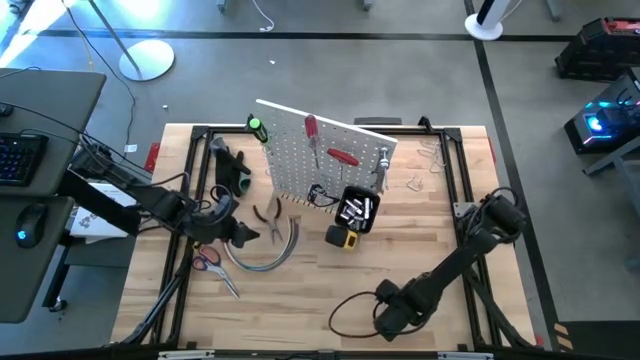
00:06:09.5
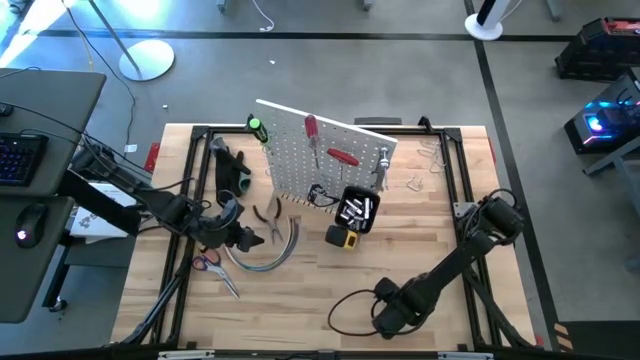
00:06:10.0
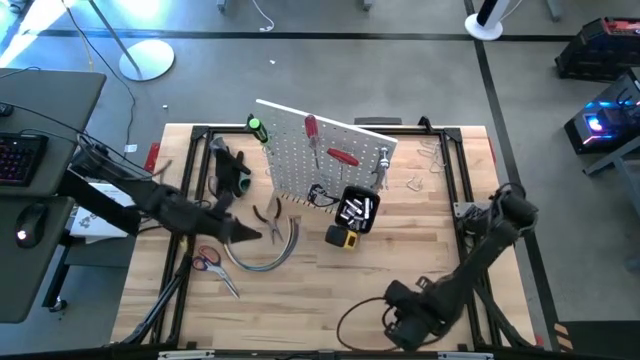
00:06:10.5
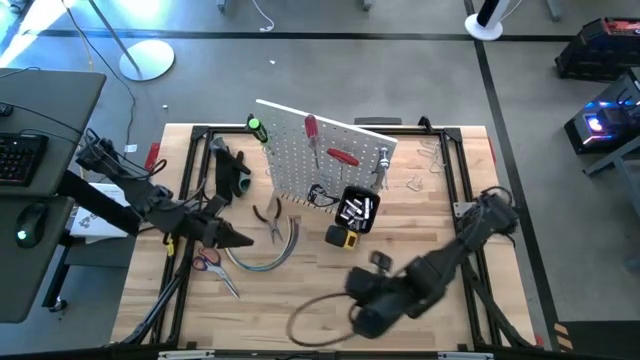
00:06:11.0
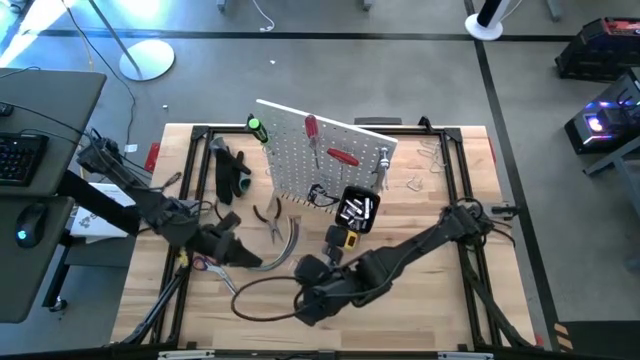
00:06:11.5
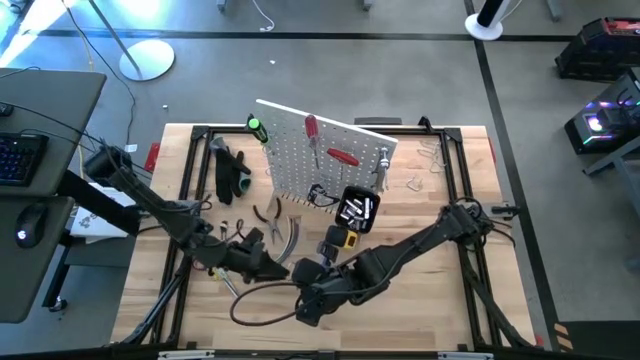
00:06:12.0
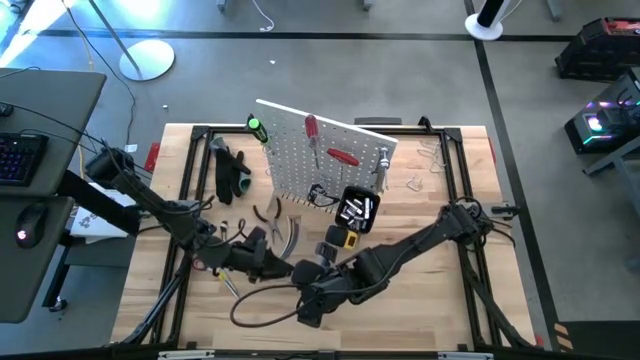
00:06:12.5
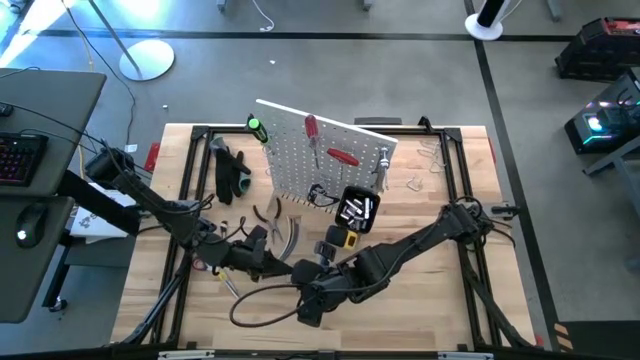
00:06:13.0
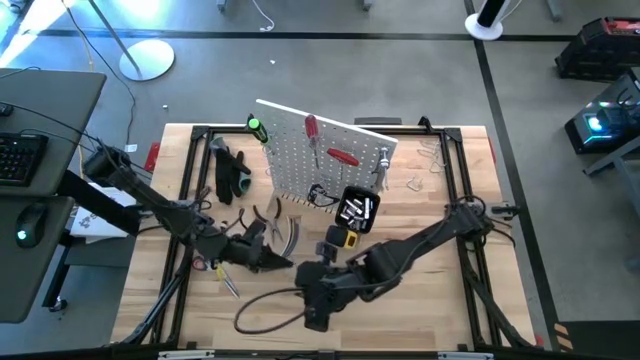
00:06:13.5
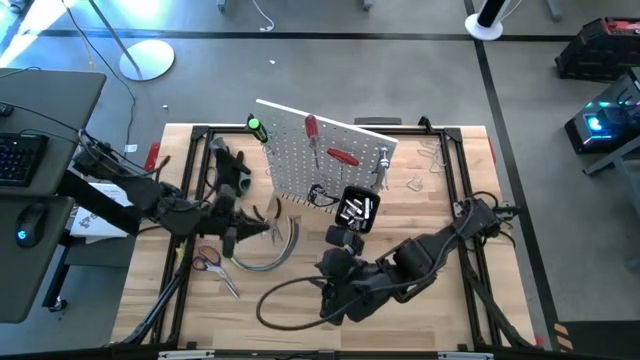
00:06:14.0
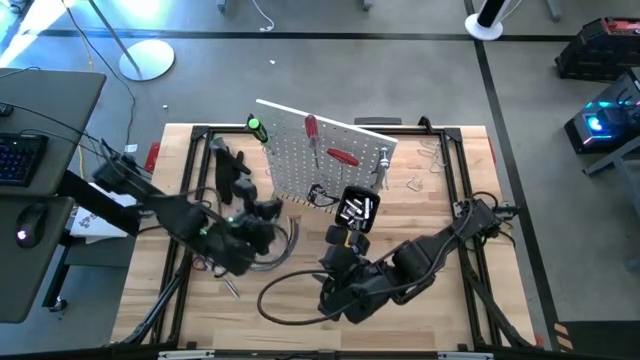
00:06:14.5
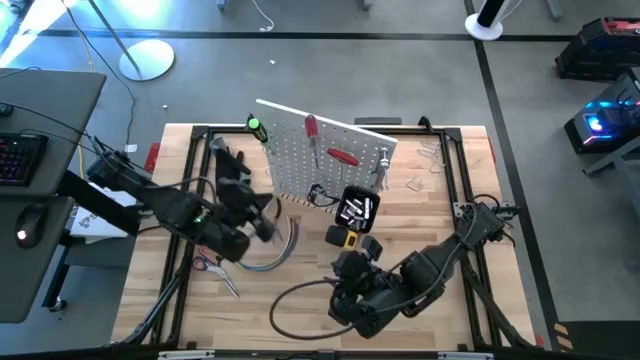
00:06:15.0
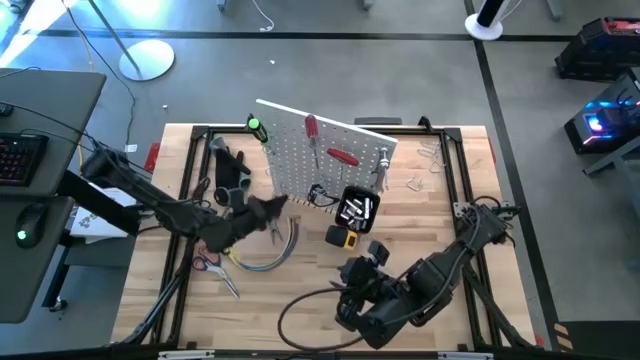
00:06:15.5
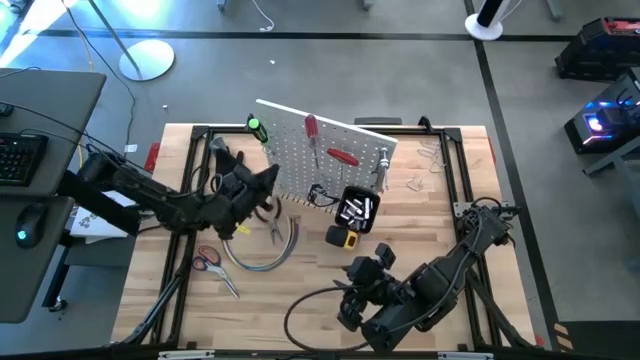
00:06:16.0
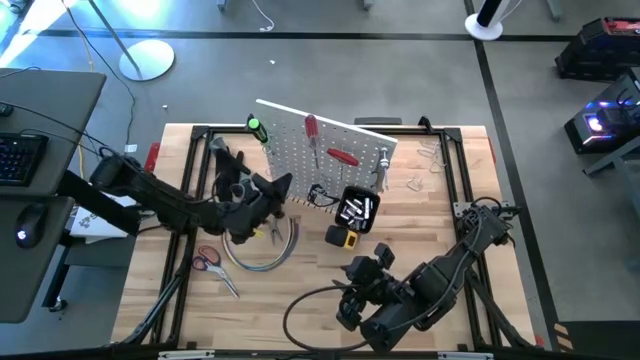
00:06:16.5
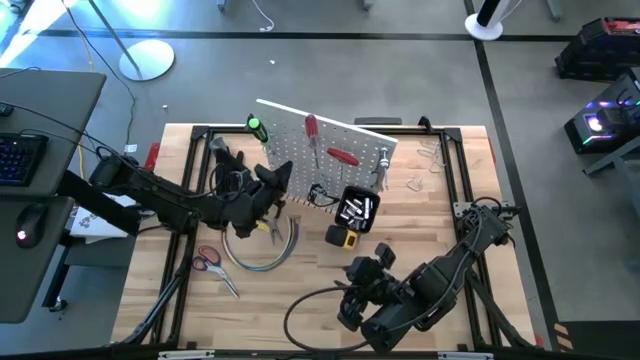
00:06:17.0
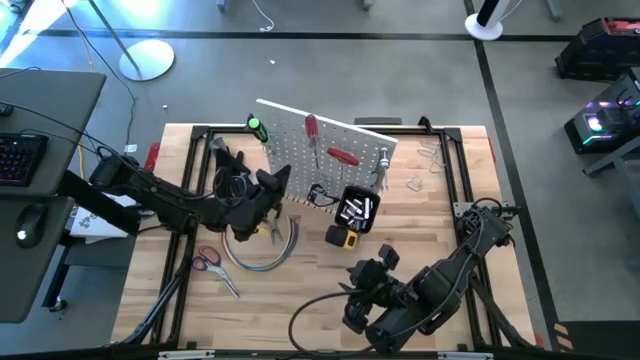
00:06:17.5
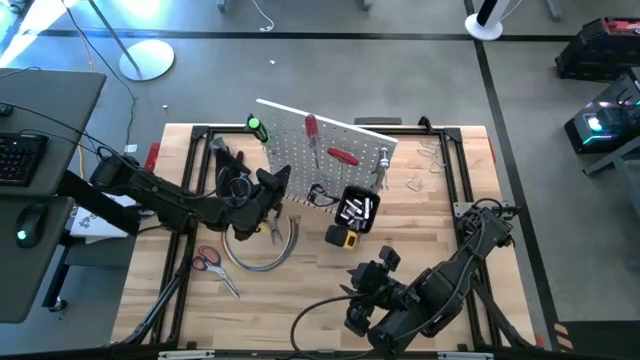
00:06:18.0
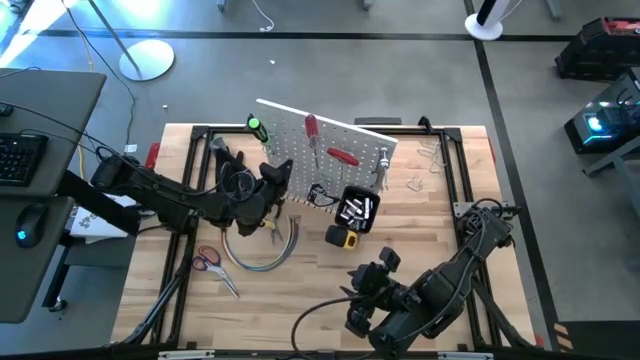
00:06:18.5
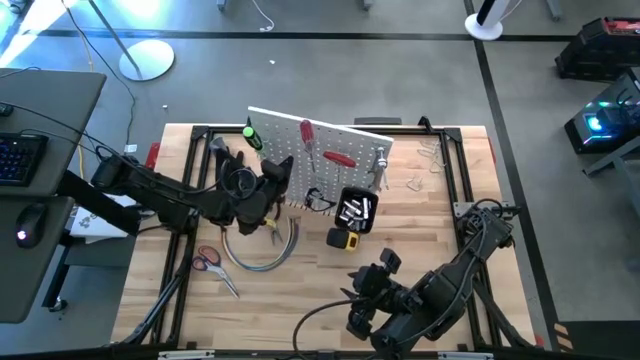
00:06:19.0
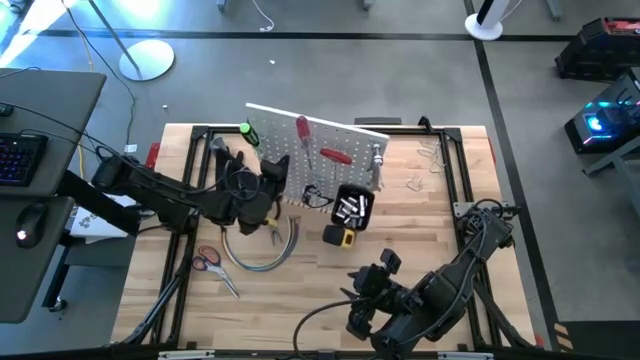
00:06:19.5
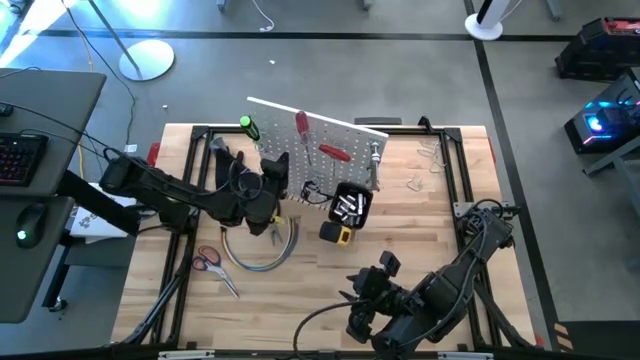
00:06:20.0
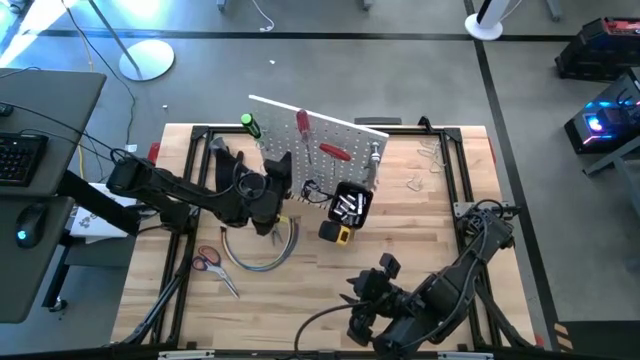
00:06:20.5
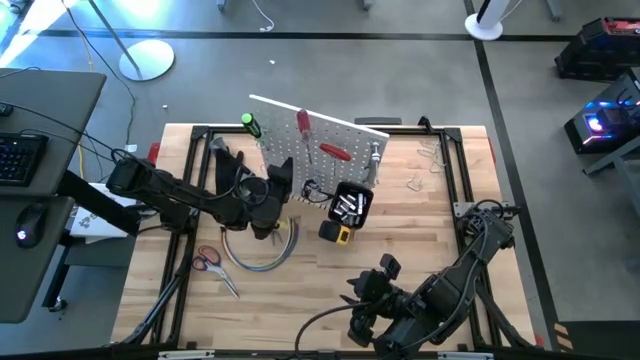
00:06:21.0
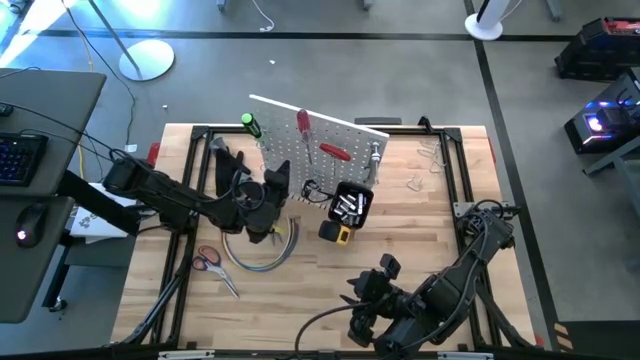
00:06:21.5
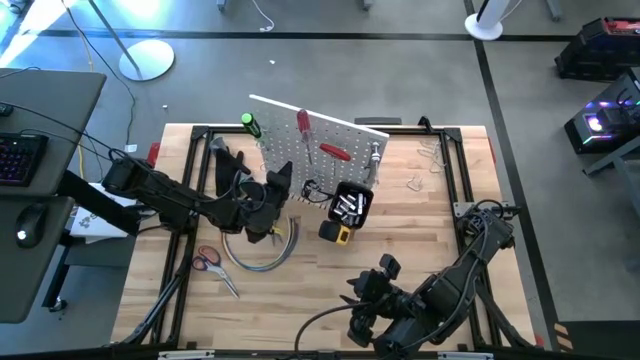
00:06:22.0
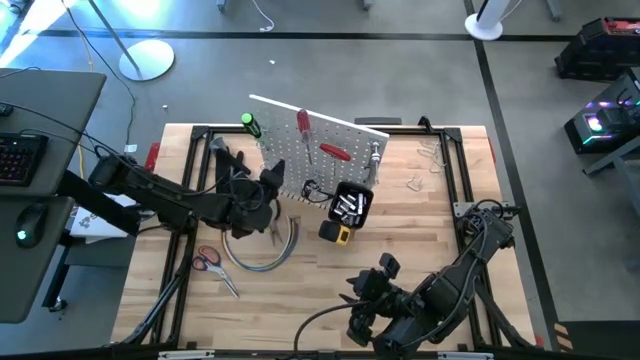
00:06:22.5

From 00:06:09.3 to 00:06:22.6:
Task: Hang tools onto peg board
Hang the peg board hook on the peg board

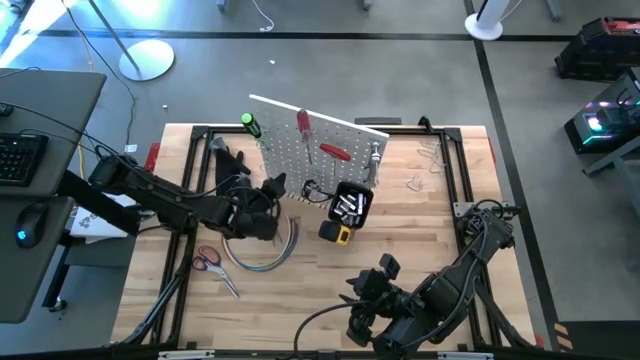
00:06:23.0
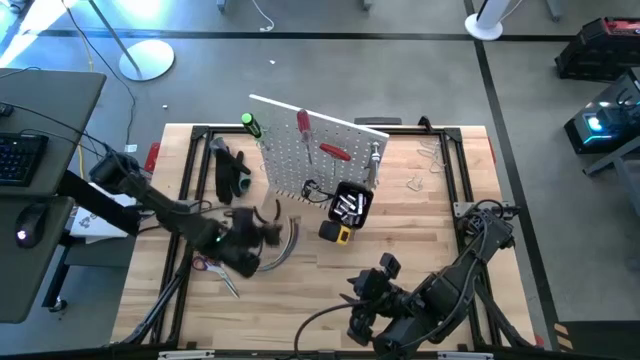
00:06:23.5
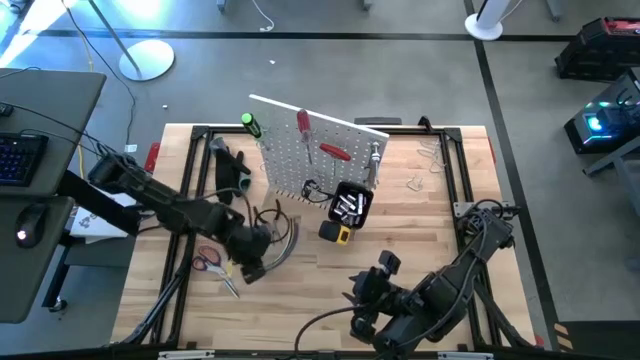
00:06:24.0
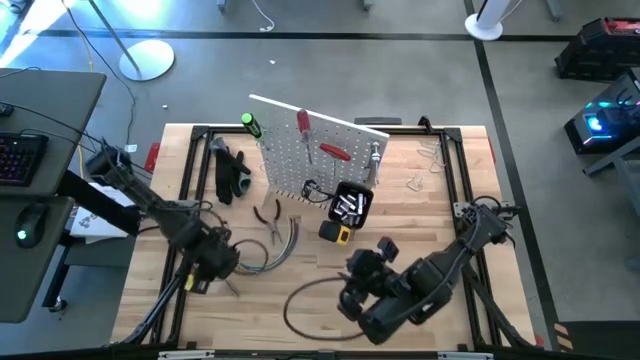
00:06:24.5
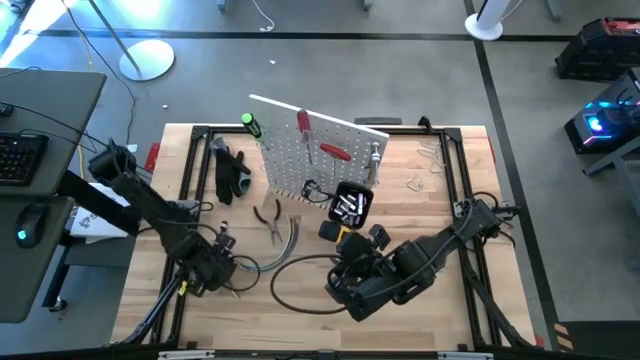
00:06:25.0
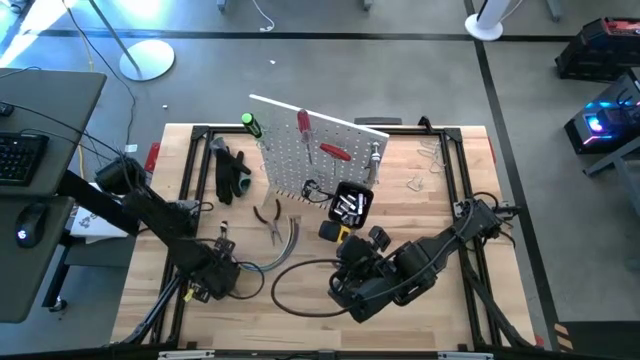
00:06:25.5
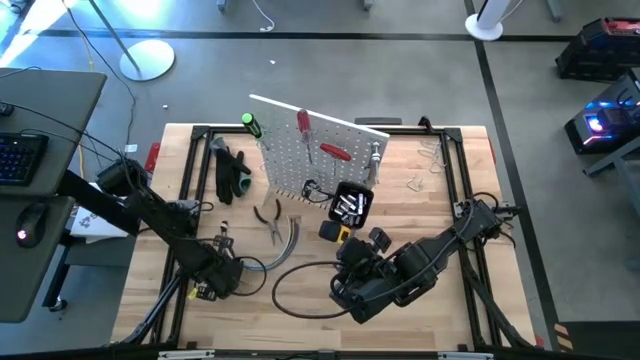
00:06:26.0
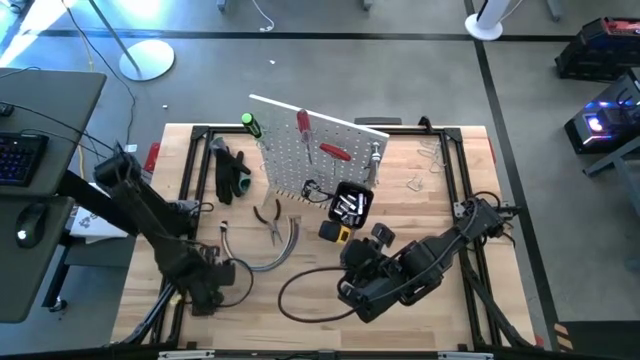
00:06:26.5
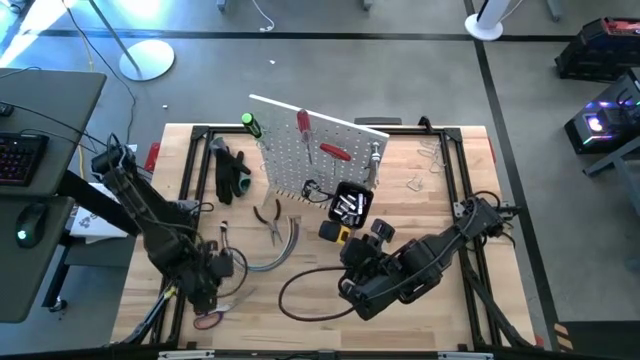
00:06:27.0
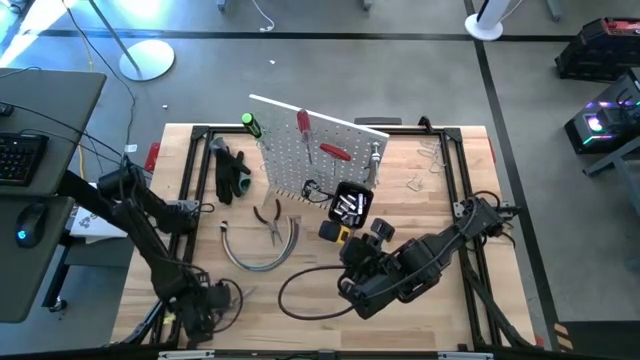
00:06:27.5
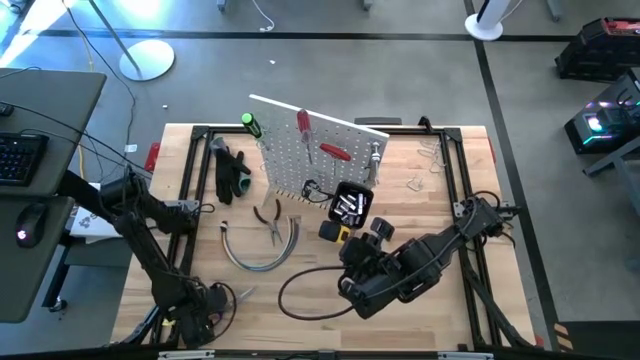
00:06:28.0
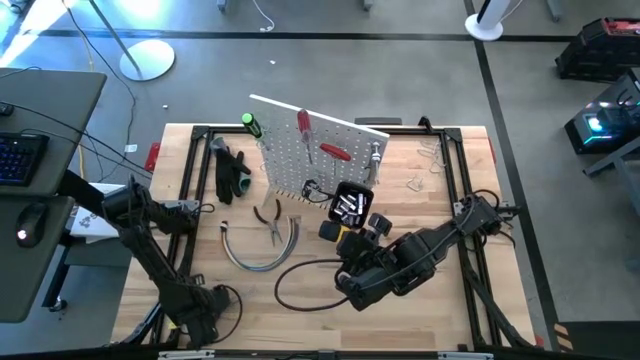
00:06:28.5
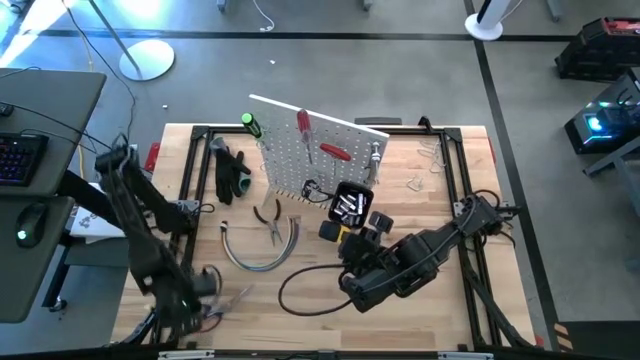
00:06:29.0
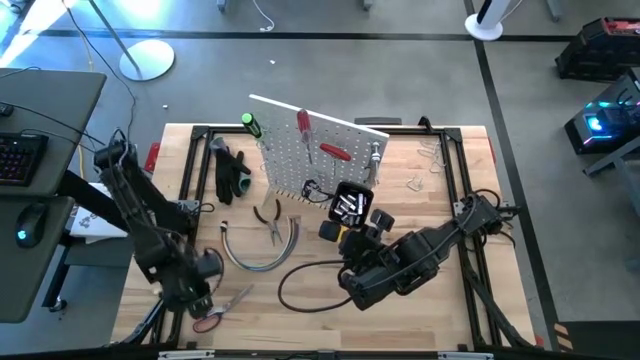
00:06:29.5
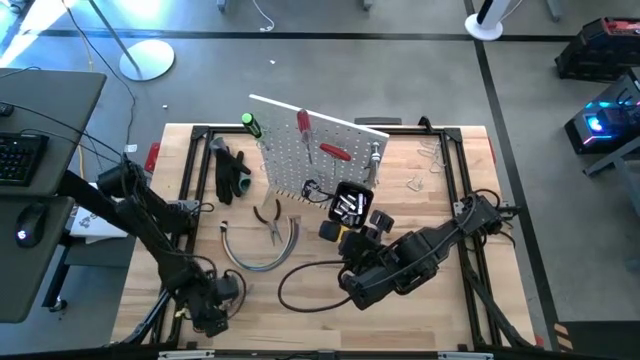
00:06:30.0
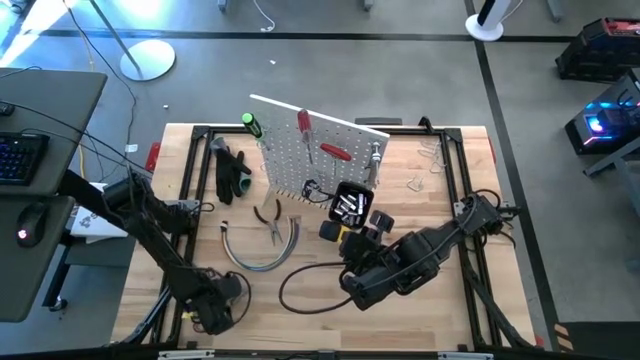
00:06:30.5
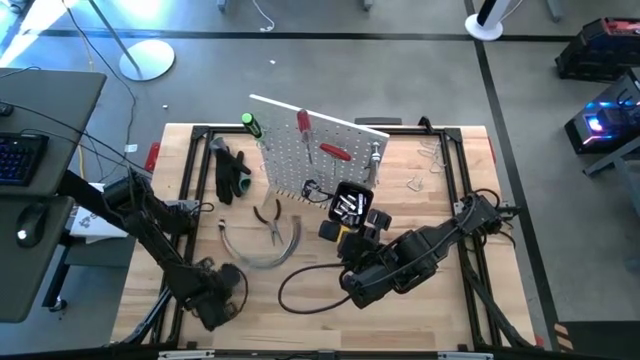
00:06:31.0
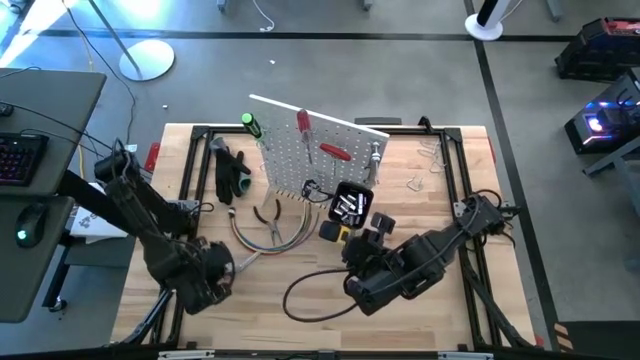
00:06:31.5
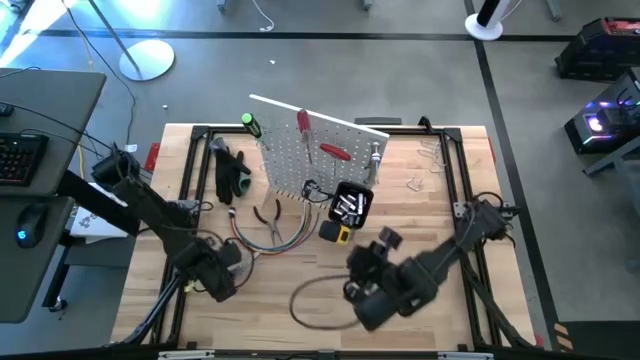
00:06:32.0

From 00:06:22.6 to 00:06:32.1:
Hang the scissors on the peg board
